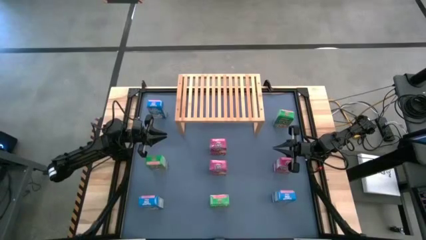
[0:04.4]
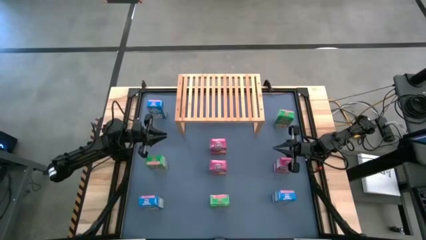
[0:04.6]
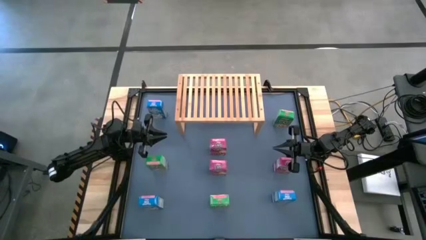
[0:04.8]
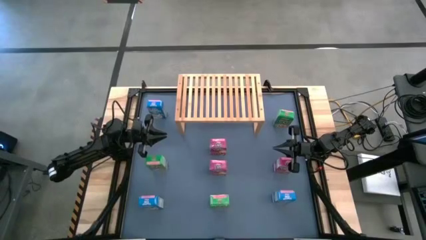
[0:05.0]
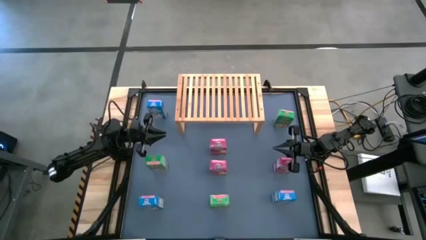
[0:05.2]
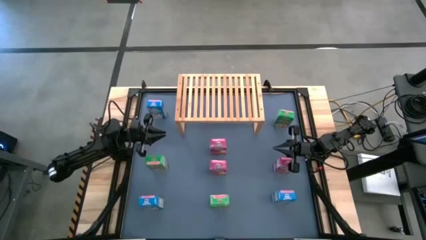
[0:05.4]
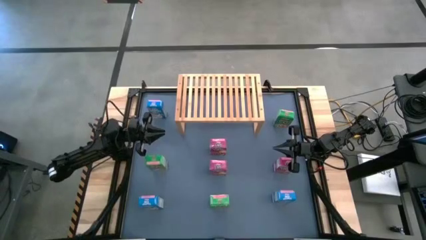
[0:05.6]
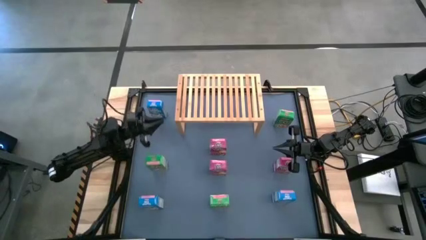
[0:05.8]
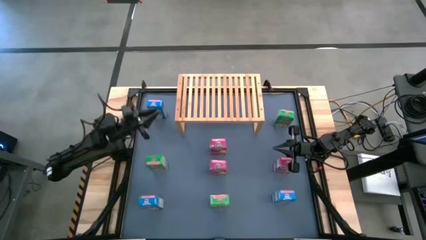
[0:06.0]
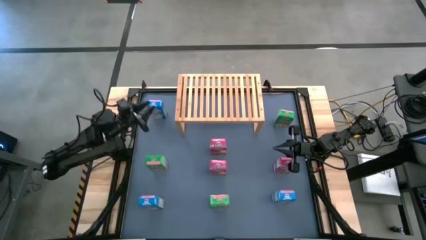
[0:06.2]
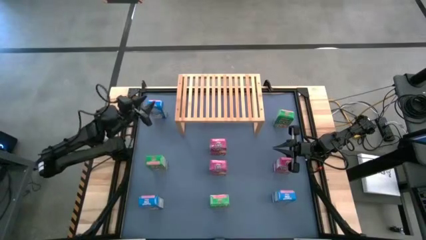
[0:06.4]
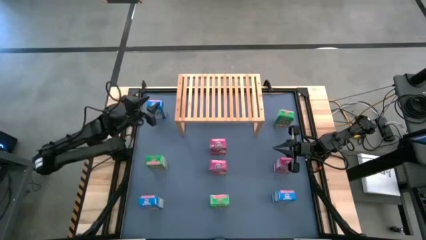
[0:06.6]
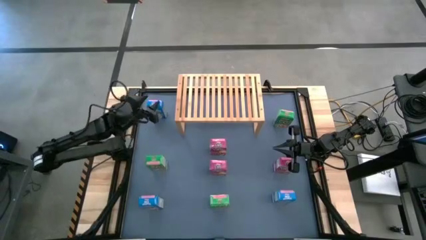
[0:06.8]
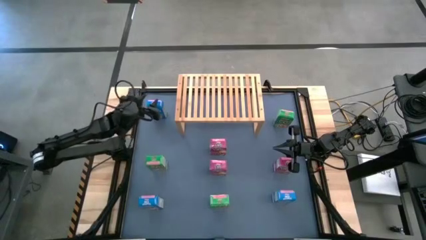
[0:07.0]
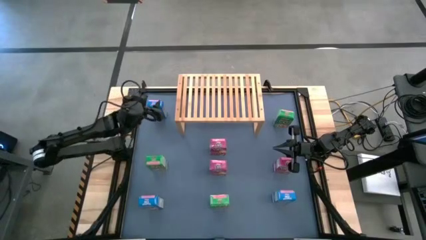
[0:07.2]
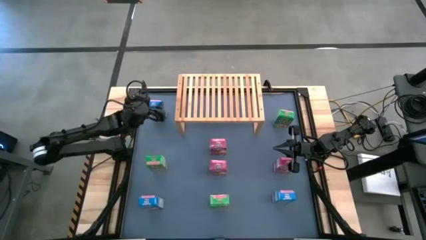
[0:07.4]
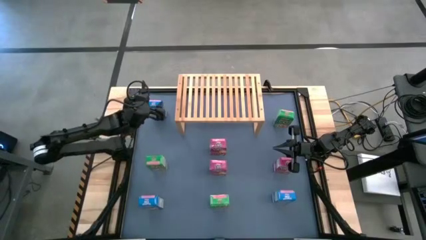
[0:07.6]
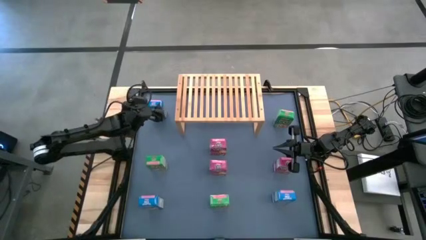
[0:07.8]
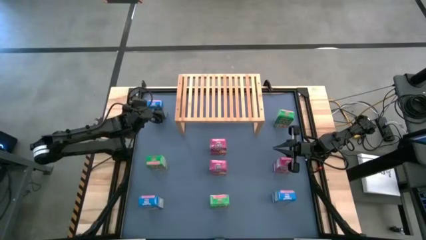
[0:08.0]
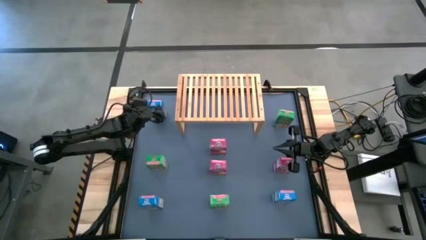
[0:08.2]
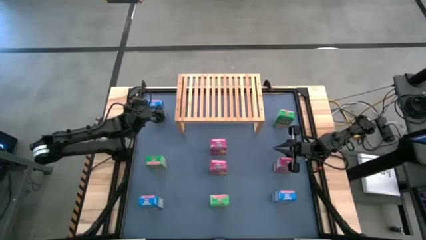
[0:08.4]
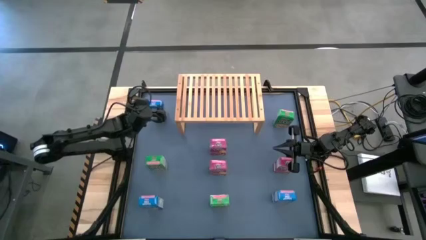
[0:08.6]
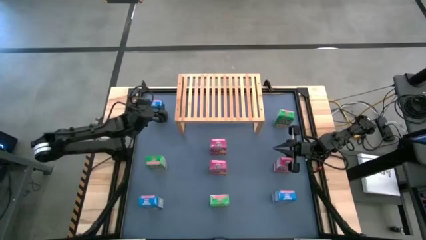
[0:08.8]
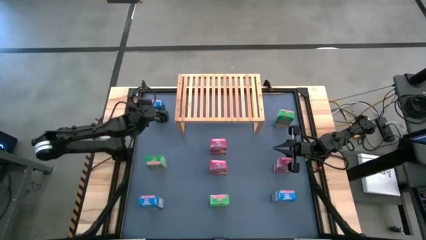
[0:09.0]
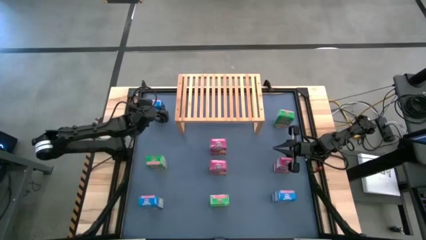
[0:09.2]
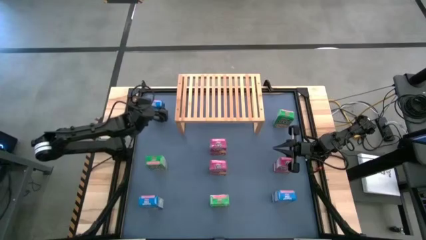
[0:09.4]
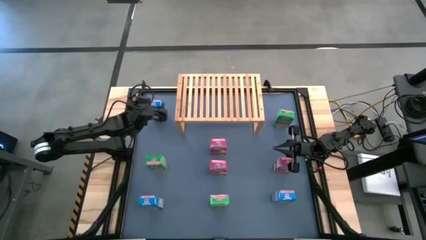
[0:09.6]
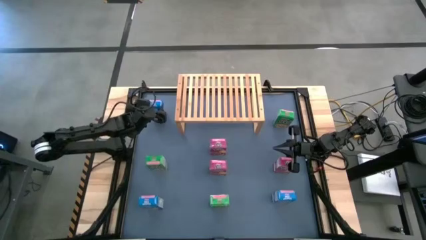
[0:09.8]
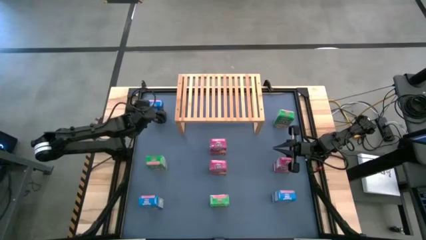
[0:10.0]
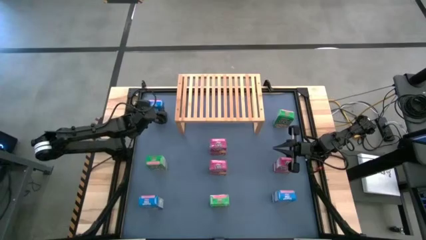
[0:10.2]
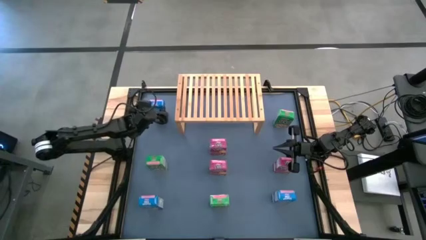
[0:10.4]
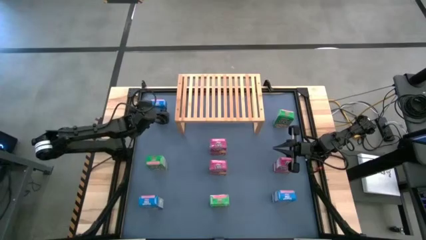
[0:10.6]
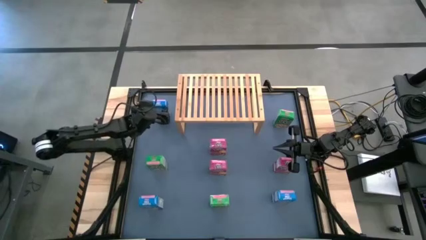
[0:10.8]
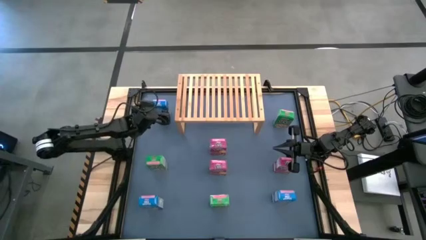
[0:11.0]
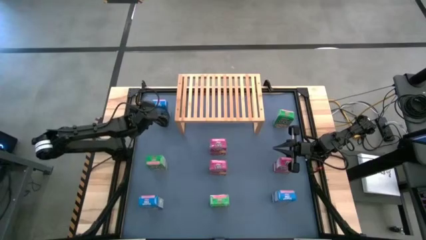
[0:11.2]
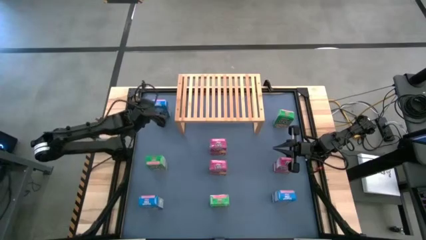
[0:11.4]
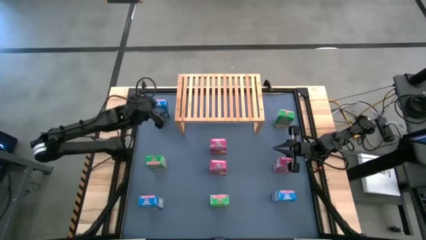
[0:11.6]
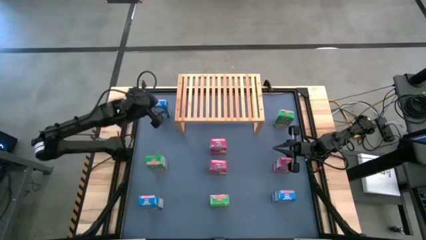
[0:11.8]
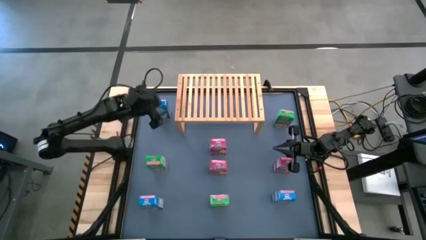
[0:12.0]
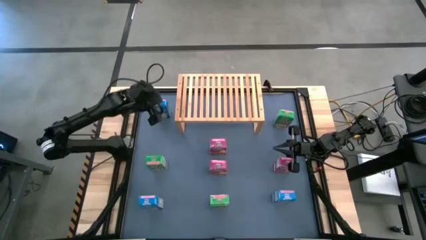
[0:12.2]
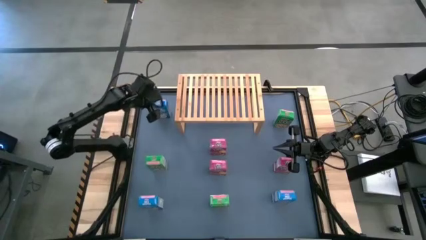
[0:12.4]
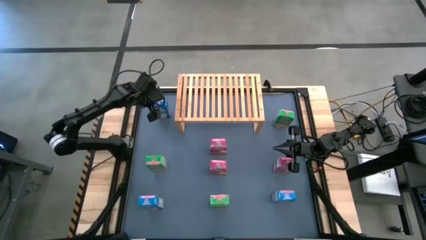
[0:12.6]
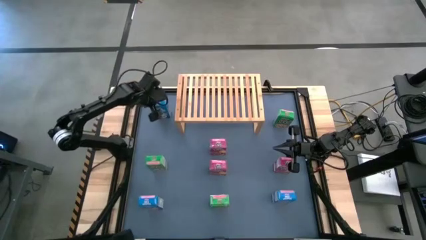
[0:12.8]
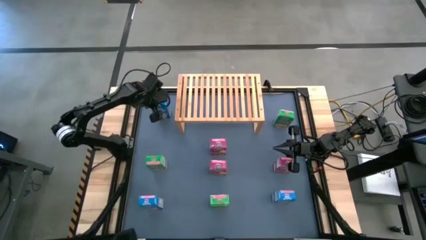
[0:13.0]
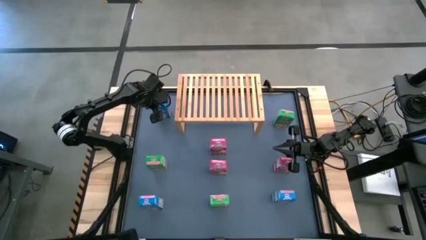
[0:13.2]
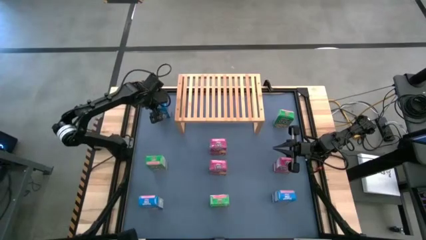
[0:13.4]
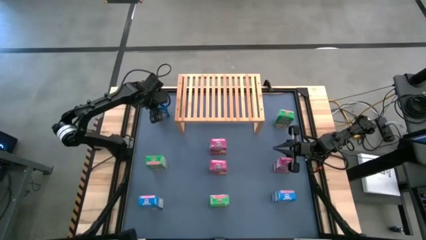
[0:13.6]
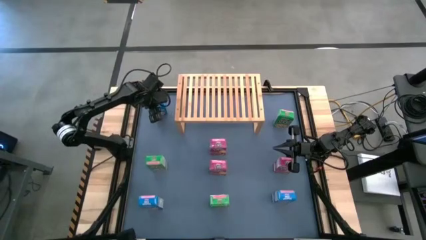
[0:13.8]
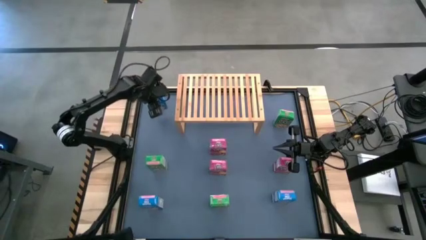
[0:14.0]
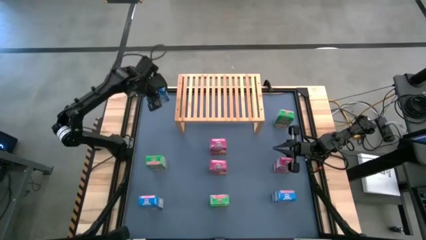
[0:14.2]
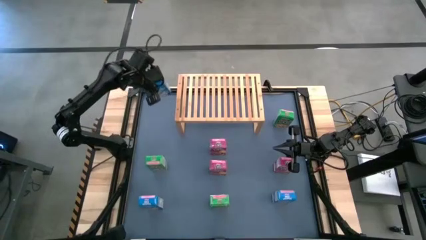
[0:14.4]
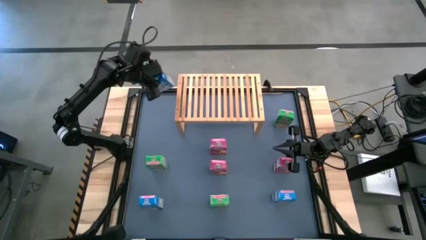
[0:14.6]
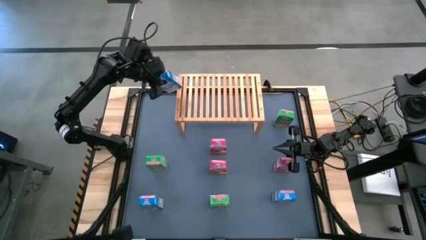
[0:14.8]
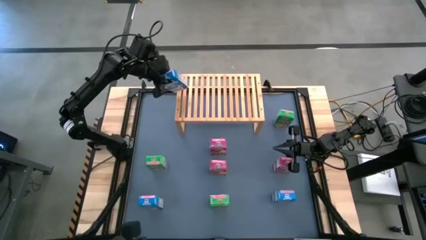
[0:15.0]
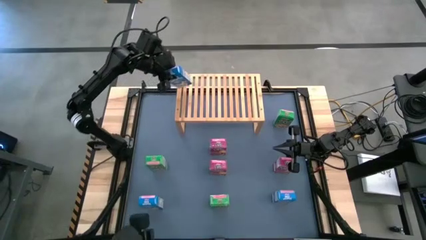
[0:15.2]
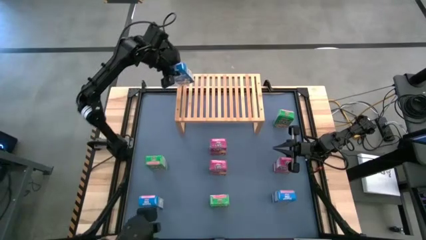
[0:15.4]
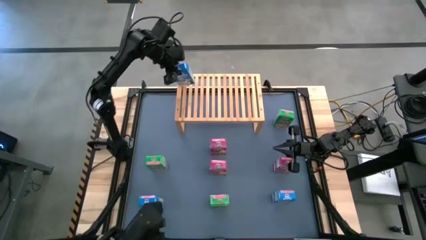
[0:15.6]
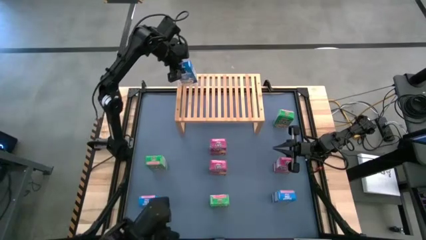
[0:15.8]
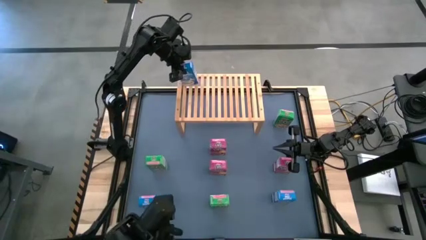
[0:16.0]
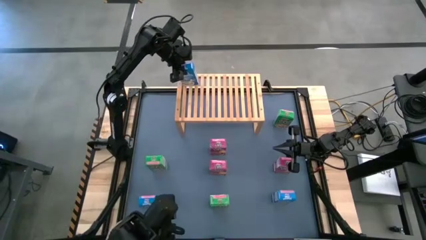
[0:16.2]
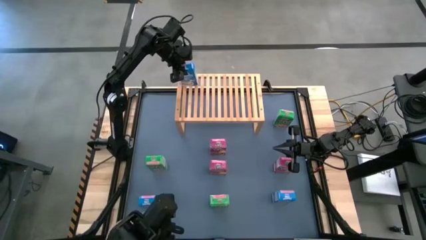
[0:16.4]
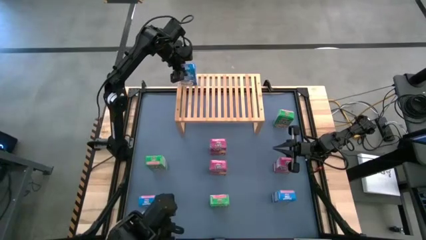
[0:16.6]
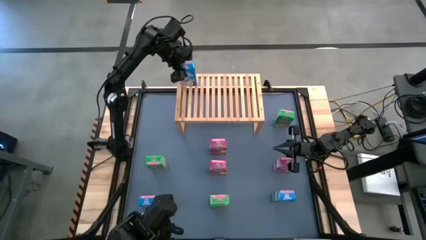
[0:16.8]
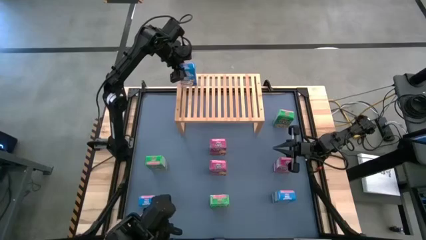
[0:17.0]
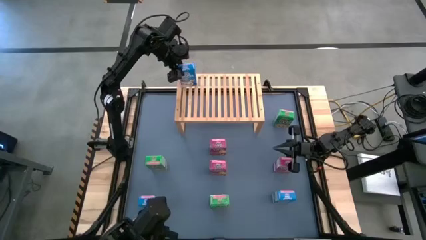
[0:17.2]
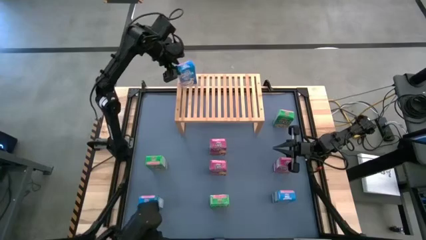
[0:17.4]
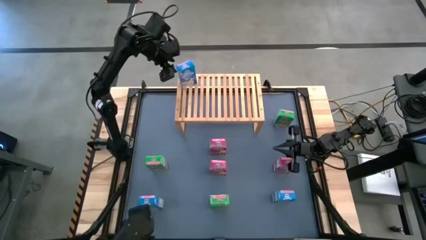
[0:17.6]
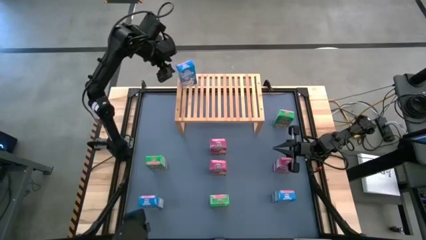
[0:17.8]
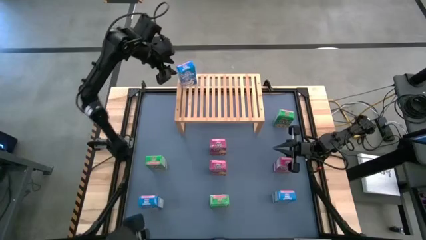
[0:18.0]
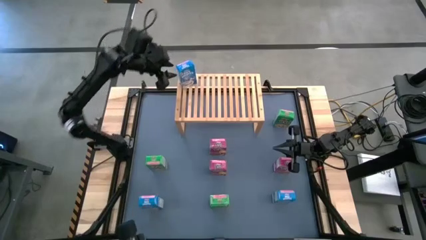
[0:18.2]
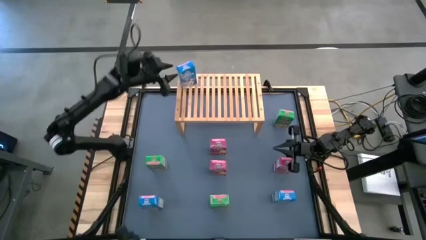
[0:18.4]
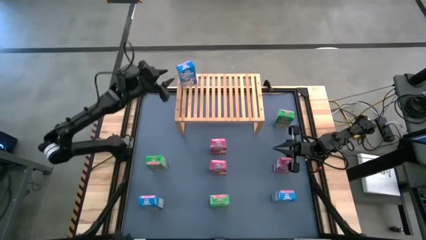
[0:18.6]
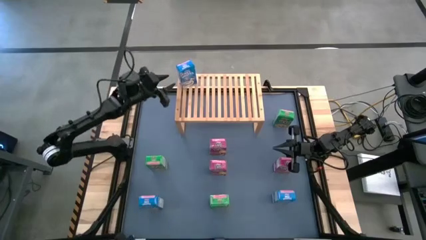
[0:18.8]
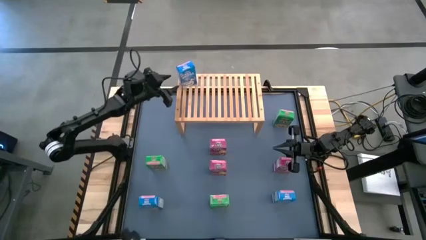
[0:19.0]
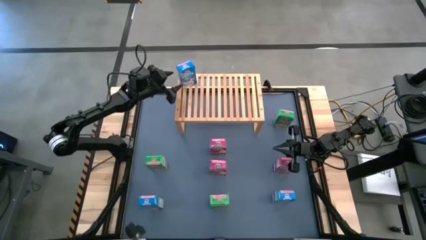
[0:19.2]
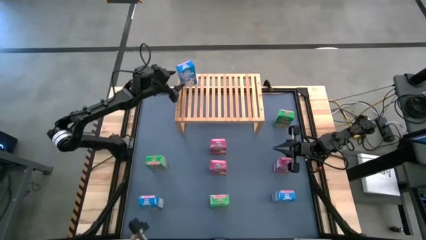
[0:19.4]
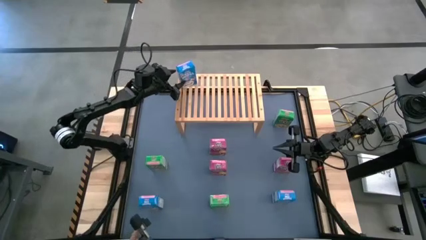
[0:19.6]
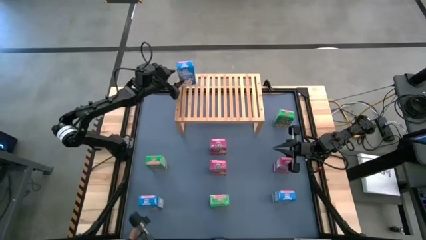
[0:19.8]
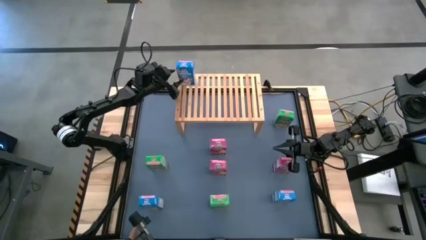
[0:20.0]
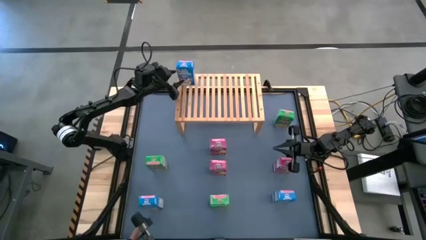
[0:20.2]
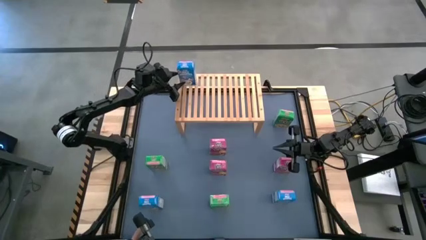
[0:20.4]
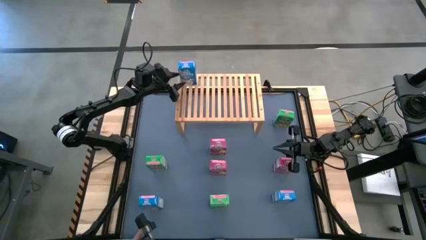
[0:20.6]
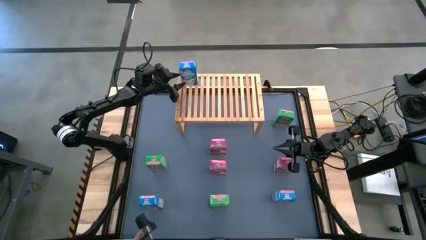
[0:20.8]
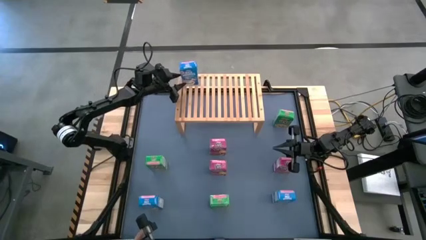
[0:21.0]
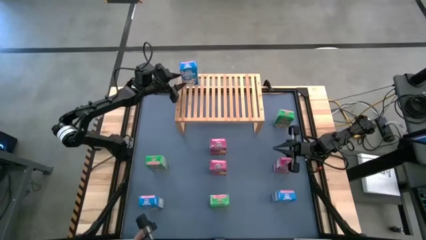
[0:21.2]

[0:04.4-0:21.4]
Task: Stack cereal on shelf
Put the top blue cereal box on the shelf
